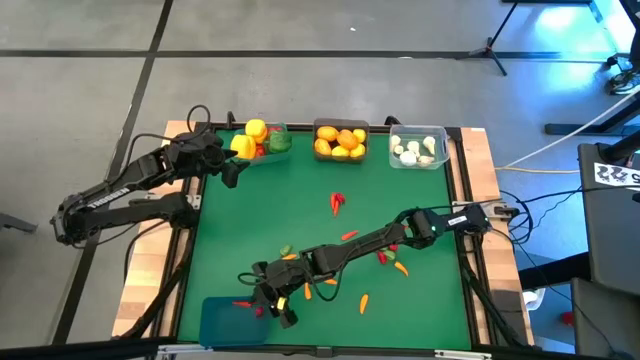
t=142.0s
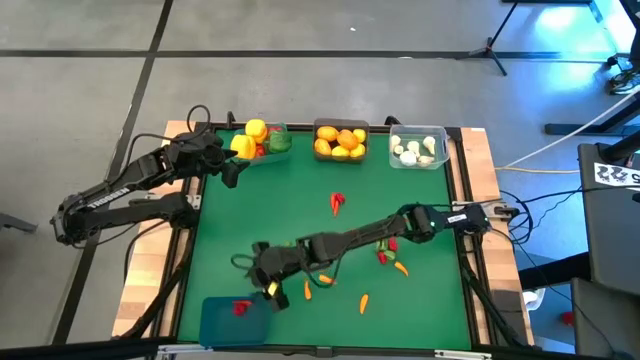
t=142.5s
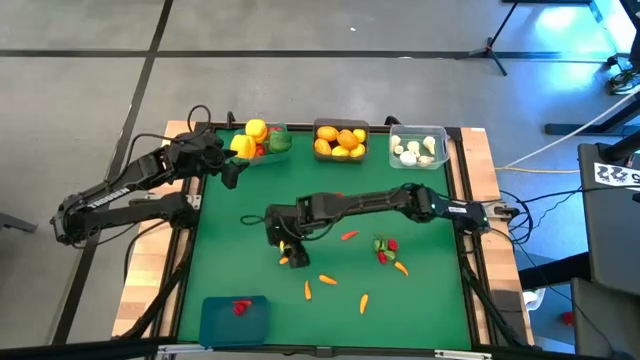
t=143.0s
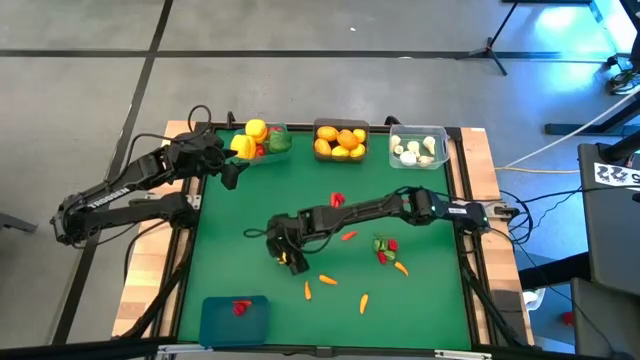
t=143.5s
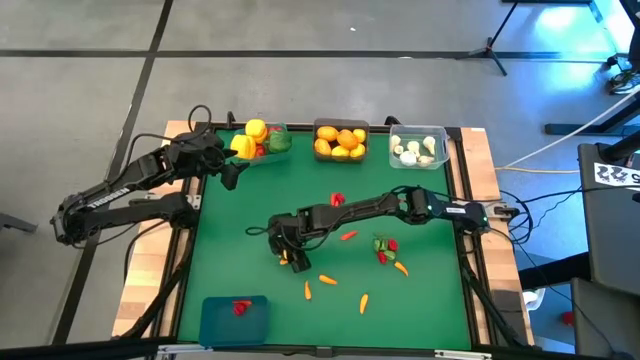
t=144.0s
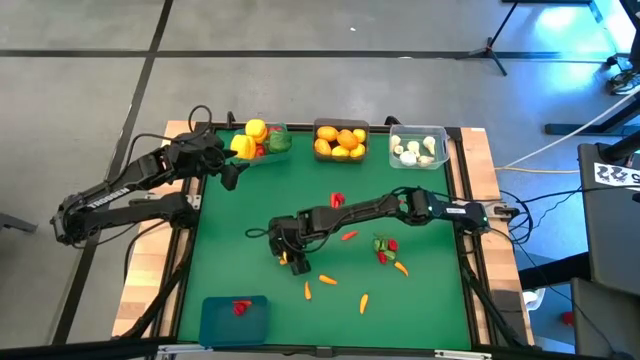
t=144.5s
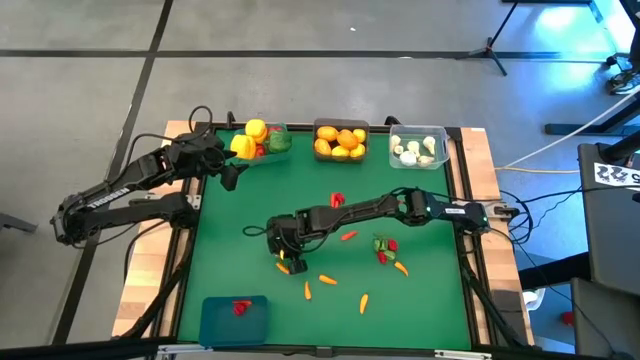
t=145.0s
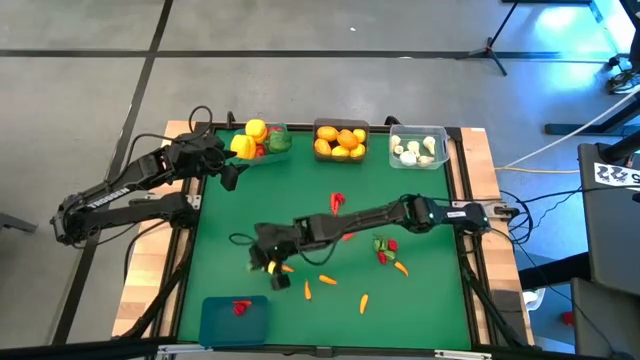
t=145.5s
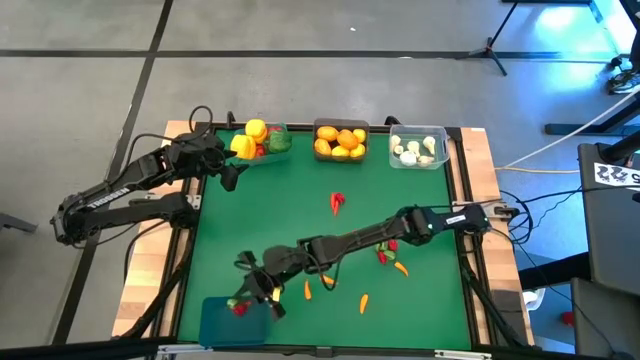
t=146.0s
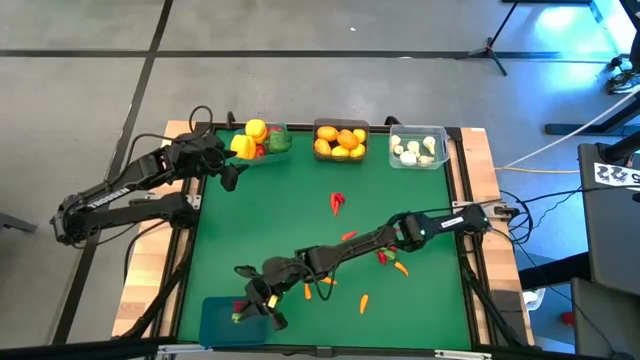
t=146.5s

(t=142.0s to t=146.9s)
Task: Sort produce into baskets
Put the green chili pepper into the dark blue bin

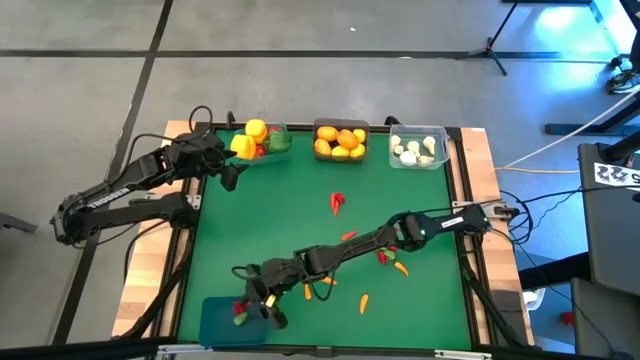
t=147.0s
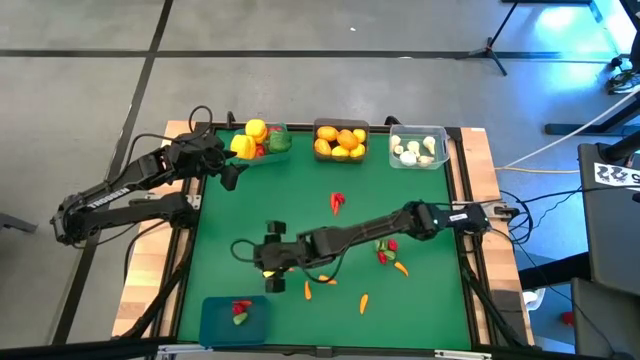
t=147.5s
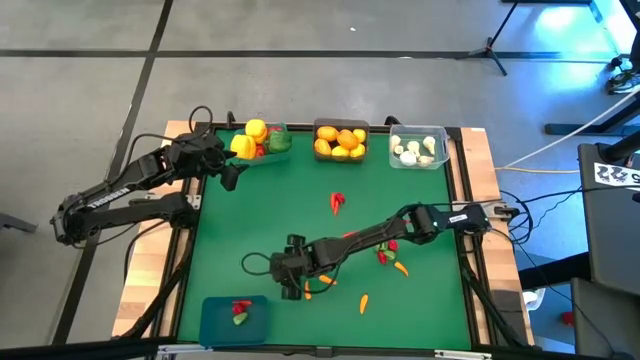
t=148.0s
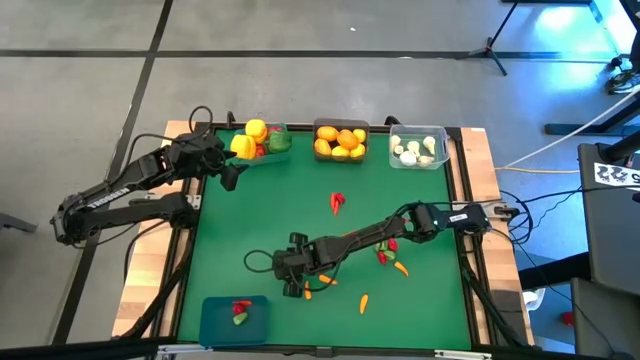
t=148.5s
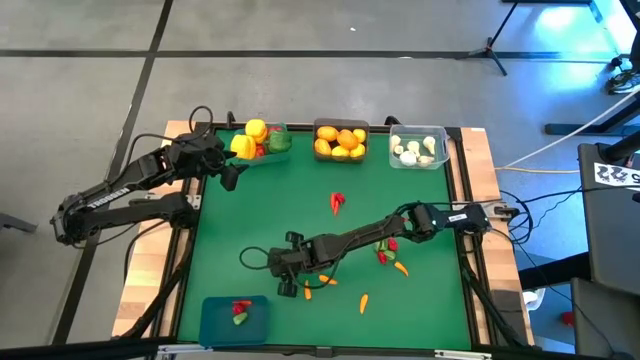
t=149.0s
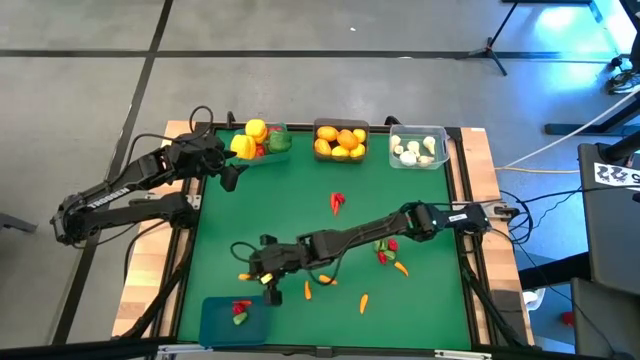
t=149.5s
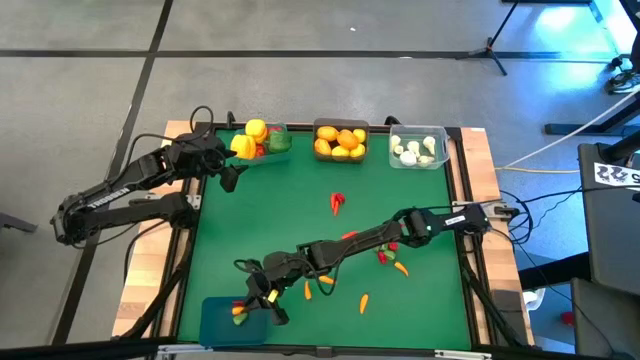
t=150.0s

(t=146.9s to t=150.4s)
Put the yellow chili pepper into the dark blue bin

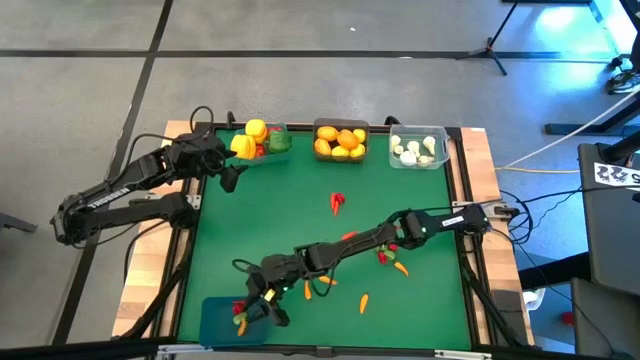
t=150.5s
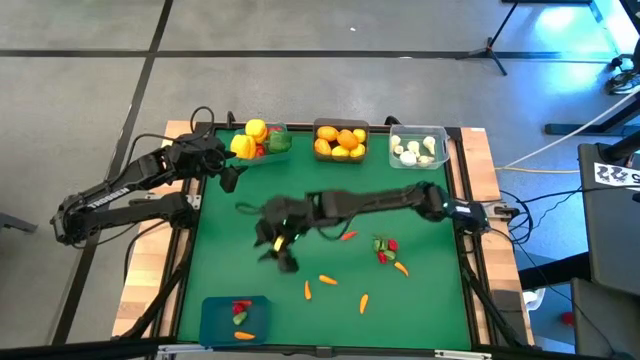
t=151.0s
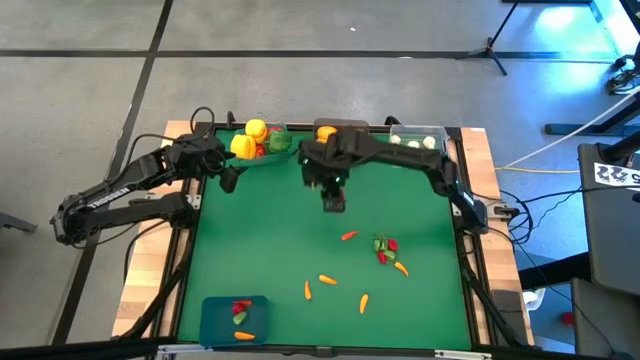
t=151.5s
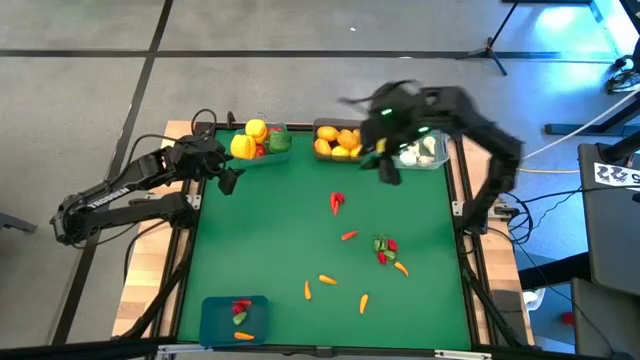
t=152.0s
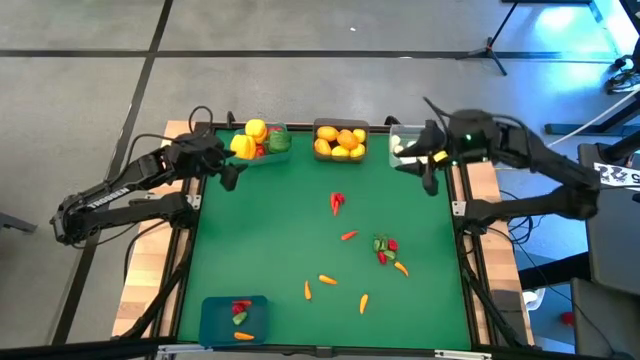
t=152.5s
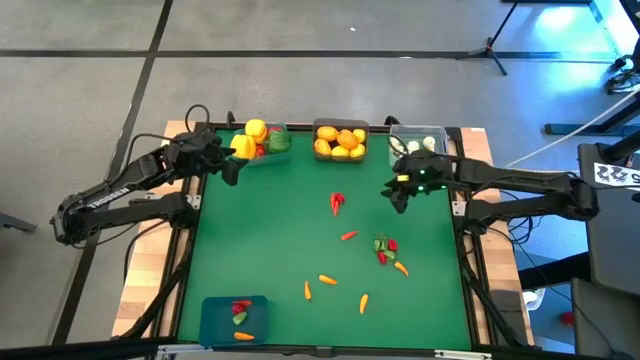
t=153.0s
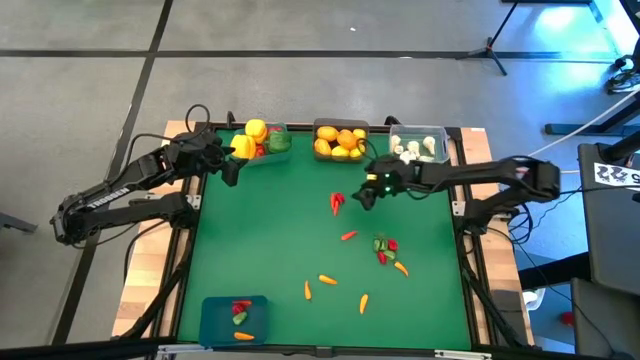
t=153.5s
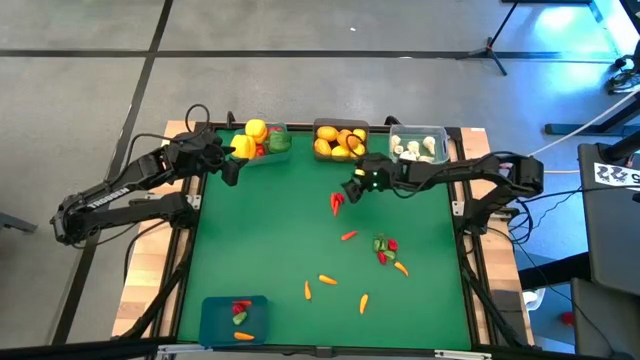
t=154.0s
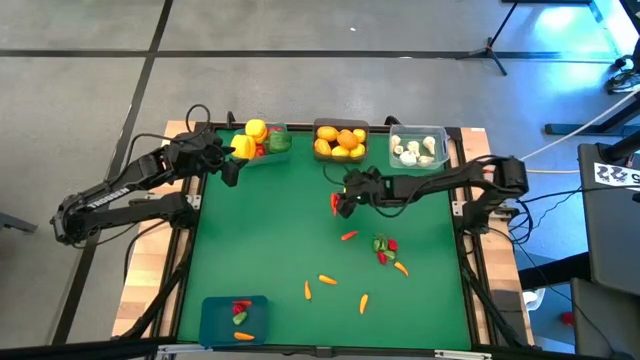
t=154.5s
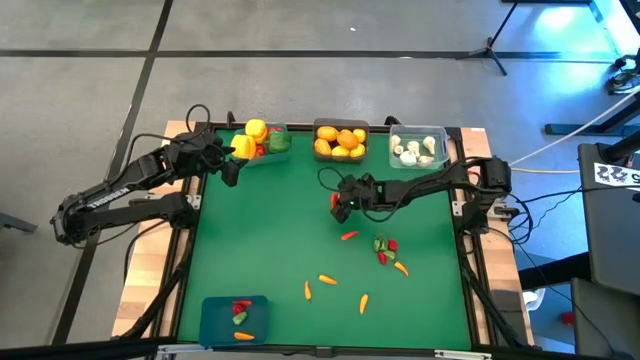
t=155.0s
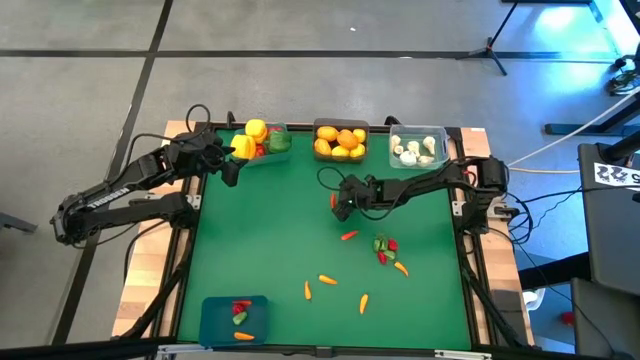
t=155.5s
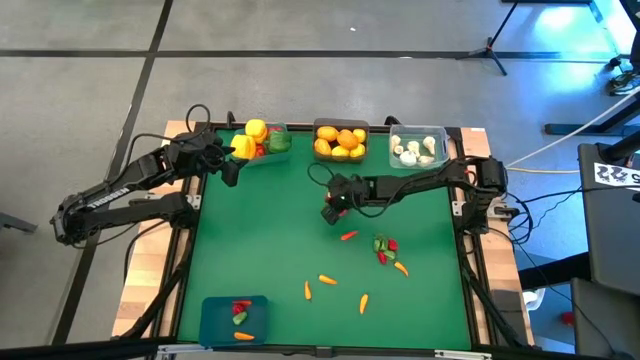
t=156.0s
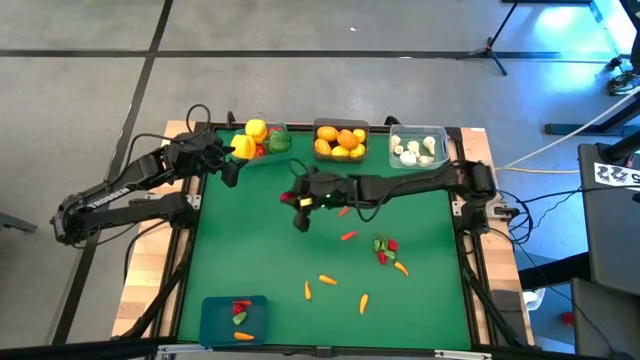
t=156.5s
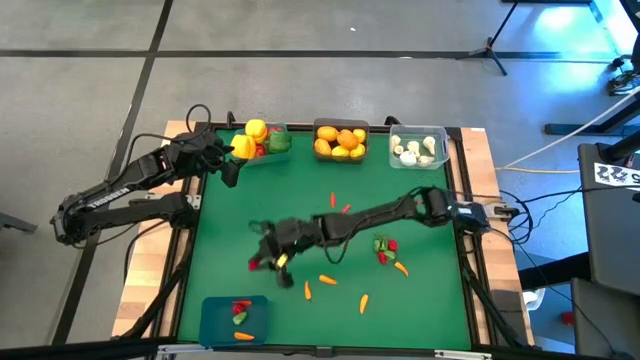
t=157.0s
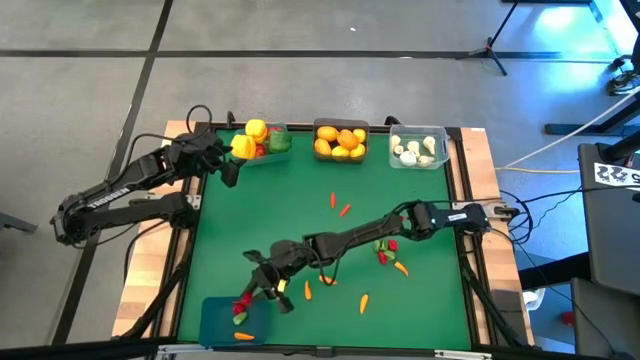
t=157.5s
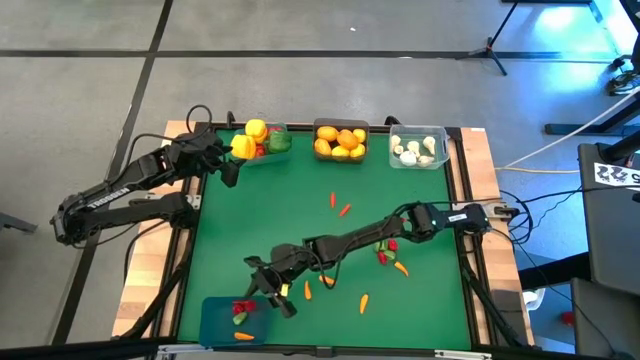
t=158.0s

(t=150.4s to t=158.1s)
Put the red chili pepper into the dark blue bin

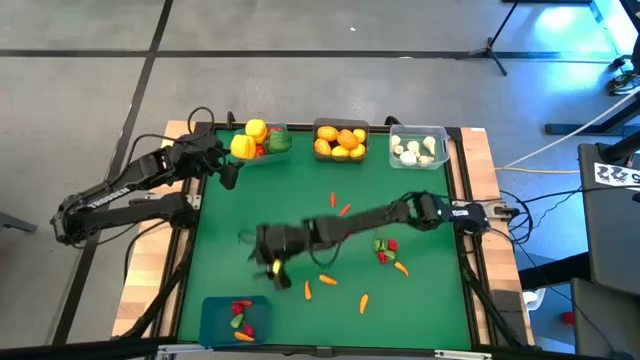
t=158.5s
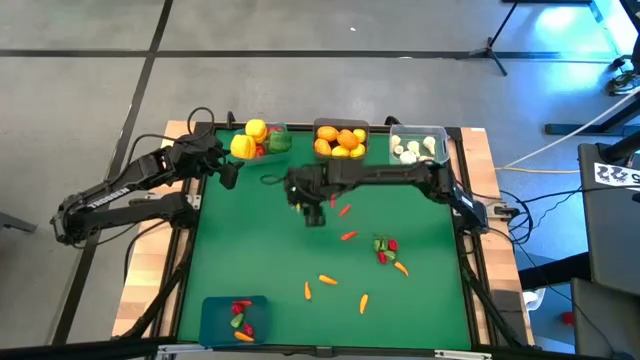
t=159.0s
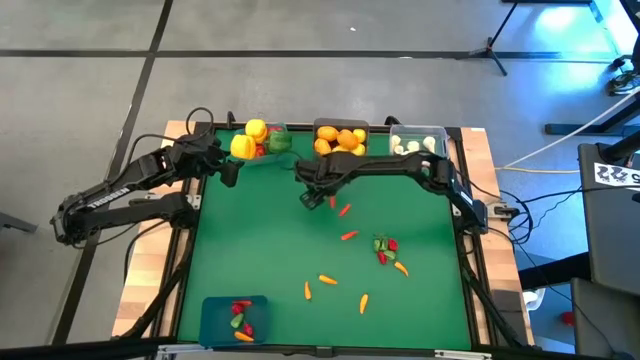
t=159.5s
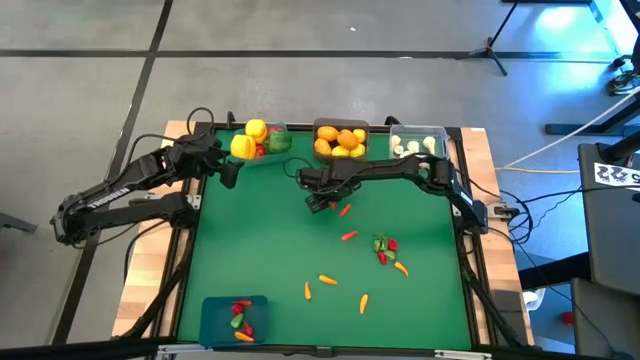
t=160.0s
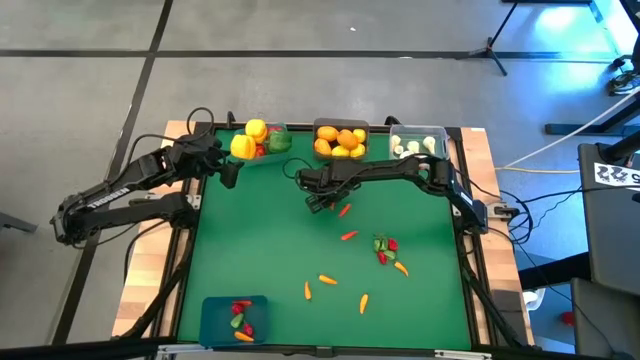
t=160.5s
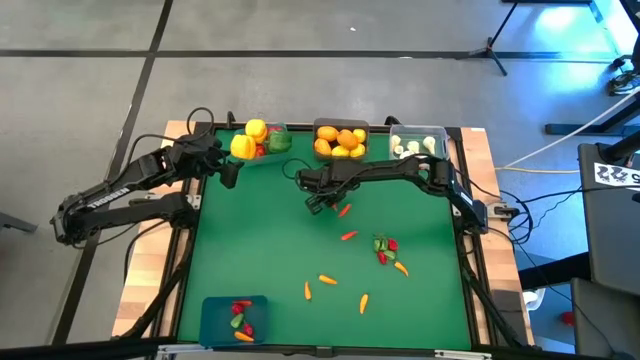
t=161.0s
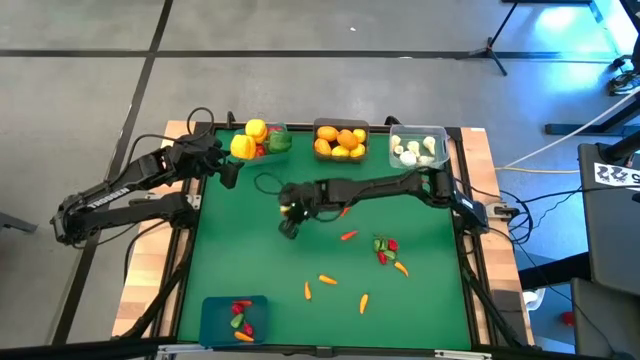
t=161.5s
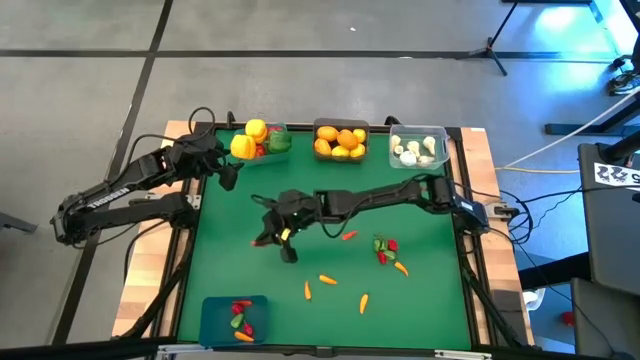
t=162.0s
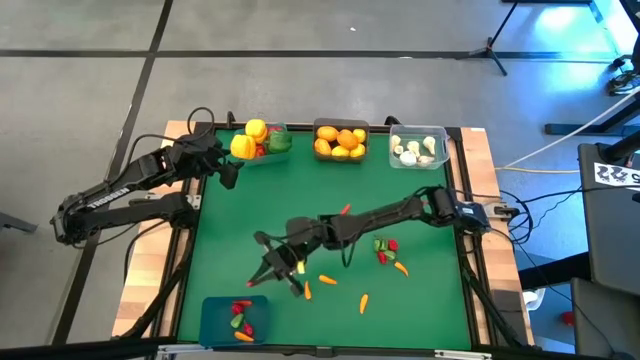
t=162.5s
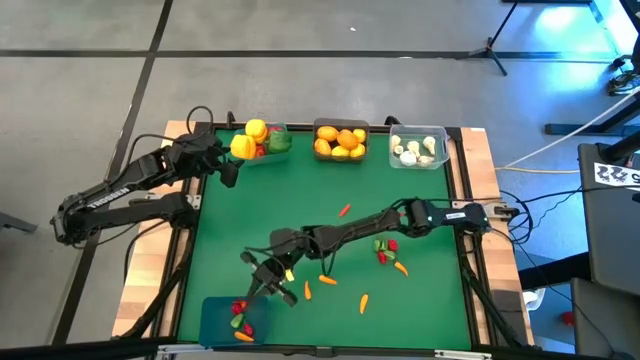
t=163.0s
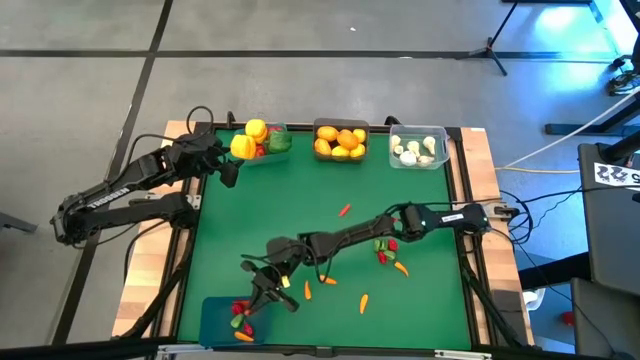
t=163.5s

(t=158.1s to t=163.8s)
Put the orange chili pepper into the dark blue bin
